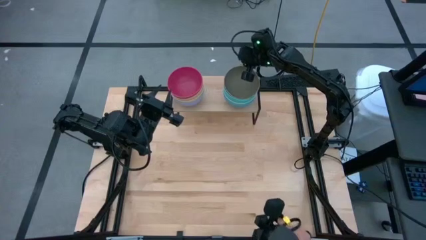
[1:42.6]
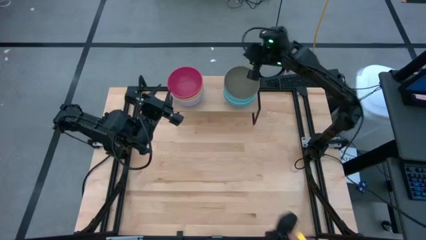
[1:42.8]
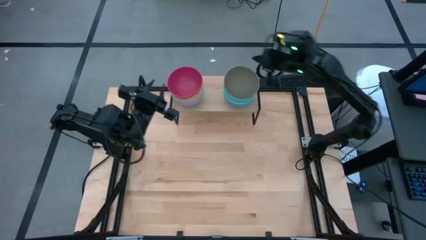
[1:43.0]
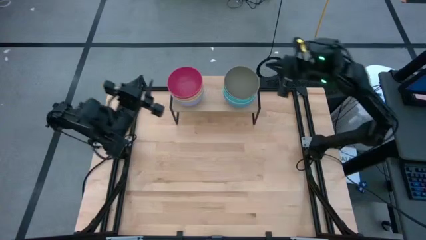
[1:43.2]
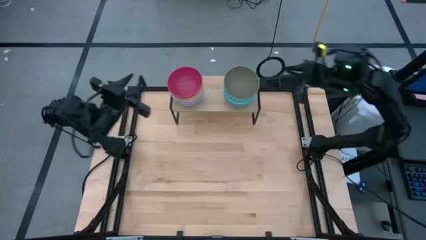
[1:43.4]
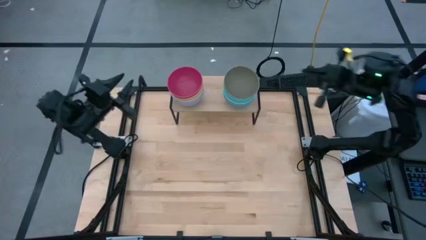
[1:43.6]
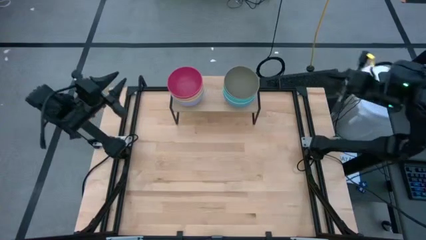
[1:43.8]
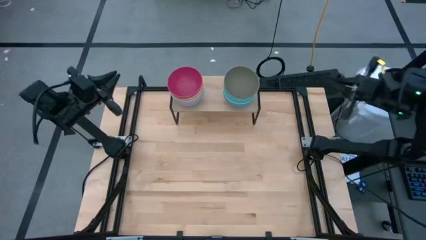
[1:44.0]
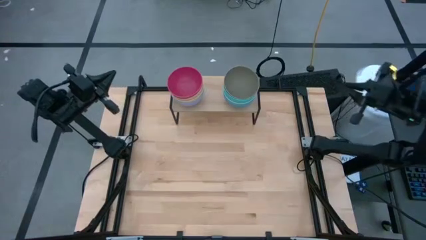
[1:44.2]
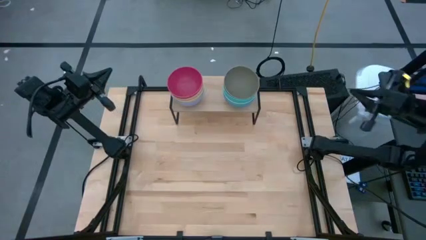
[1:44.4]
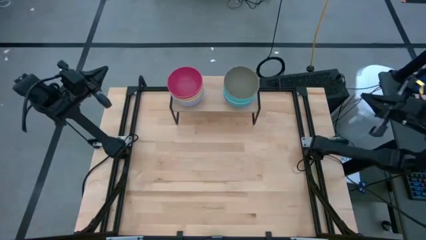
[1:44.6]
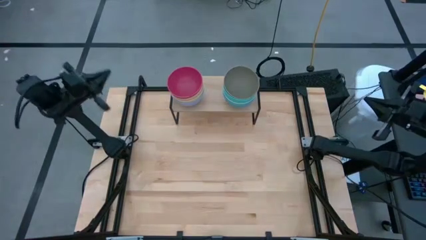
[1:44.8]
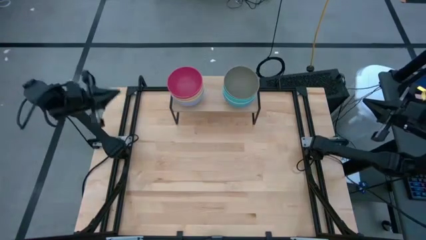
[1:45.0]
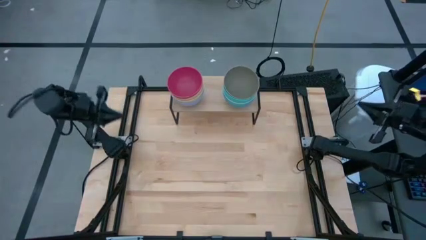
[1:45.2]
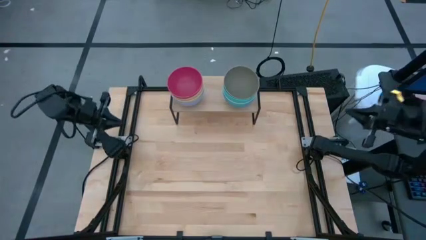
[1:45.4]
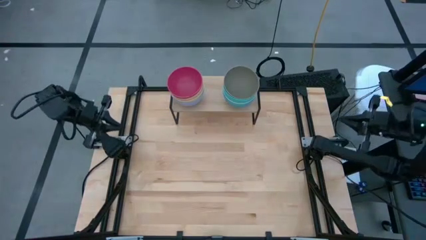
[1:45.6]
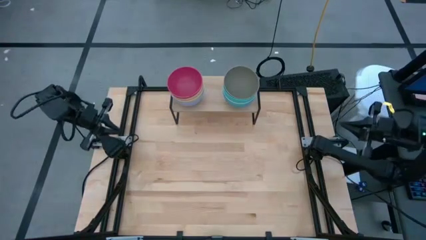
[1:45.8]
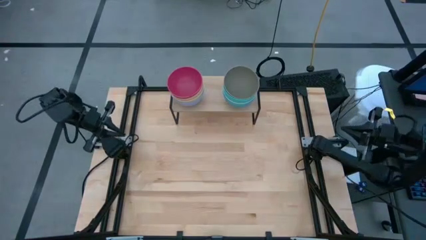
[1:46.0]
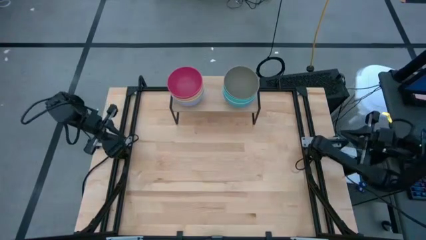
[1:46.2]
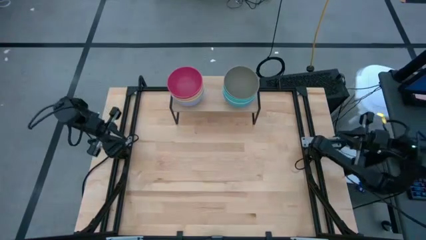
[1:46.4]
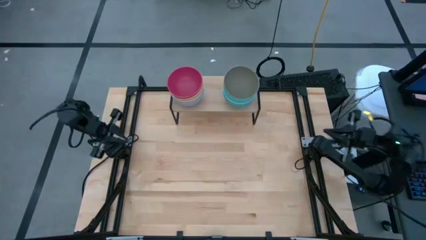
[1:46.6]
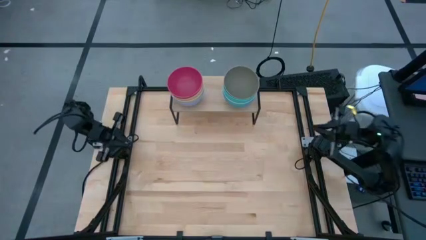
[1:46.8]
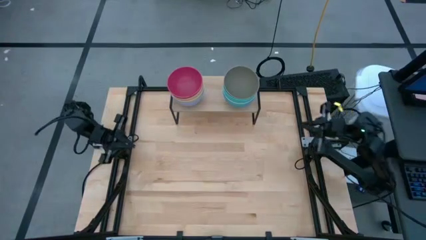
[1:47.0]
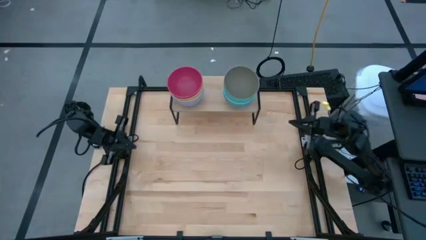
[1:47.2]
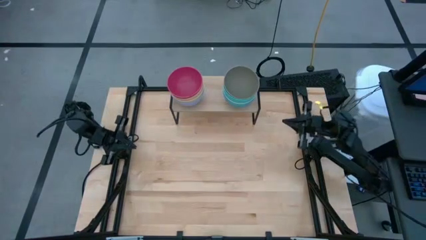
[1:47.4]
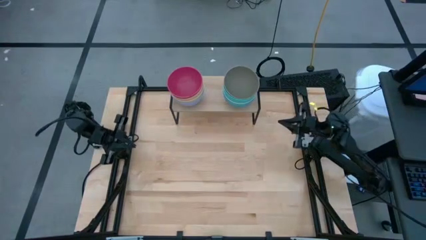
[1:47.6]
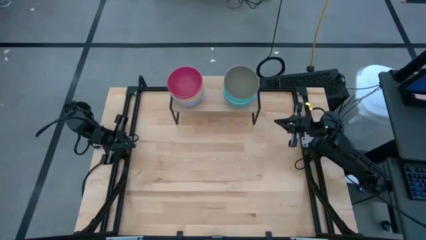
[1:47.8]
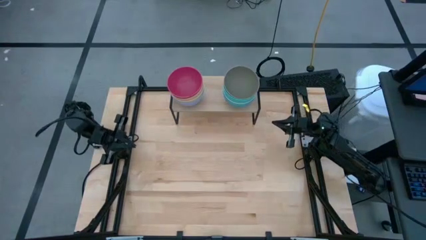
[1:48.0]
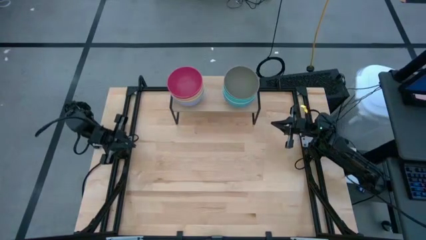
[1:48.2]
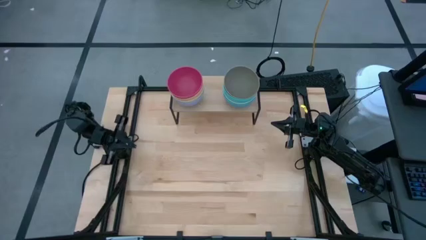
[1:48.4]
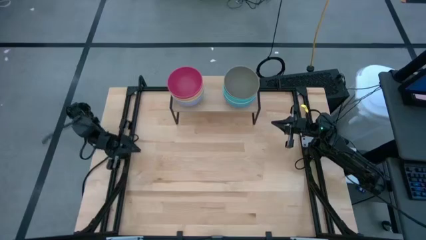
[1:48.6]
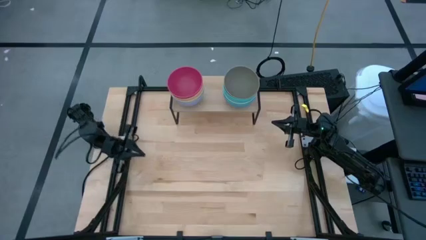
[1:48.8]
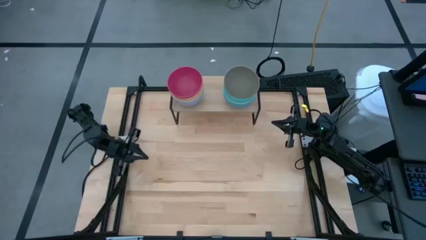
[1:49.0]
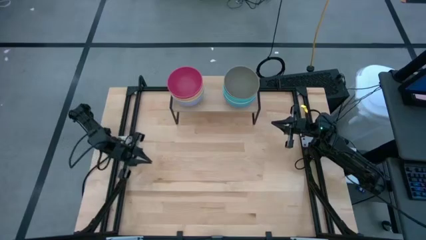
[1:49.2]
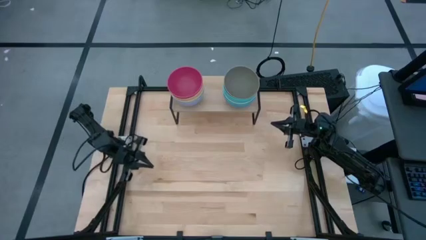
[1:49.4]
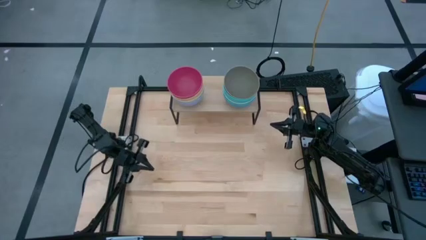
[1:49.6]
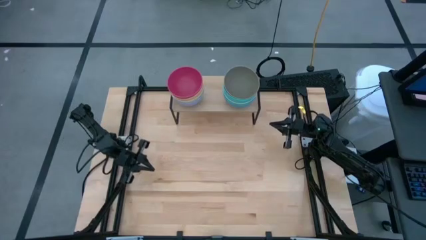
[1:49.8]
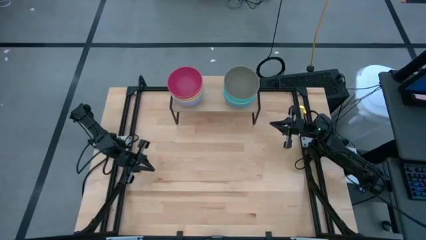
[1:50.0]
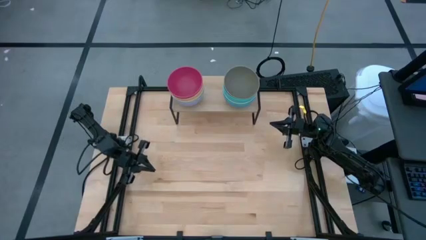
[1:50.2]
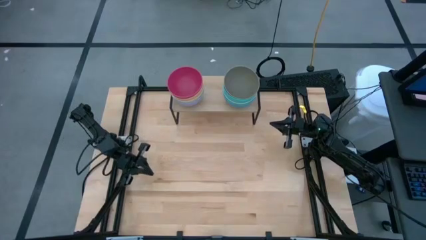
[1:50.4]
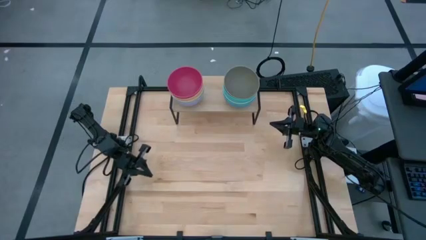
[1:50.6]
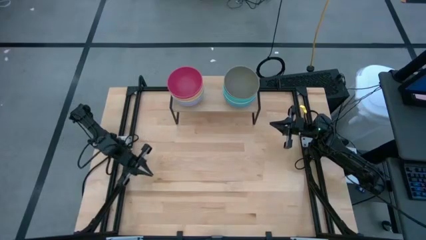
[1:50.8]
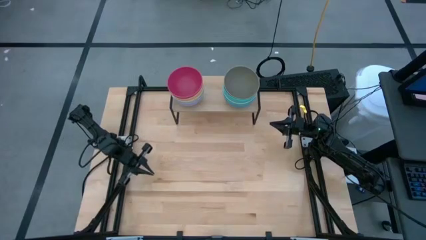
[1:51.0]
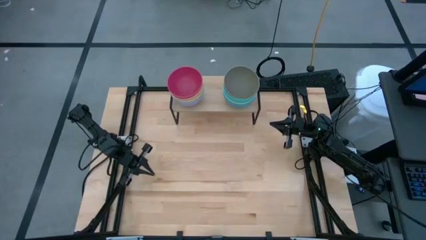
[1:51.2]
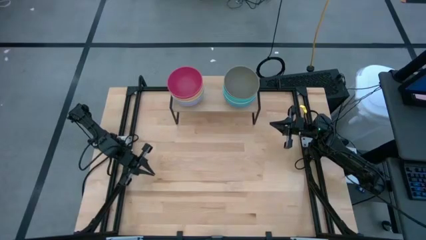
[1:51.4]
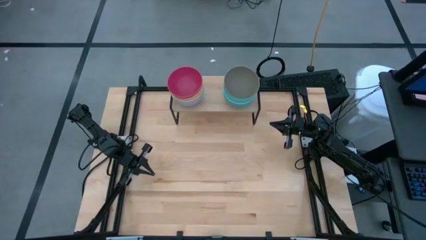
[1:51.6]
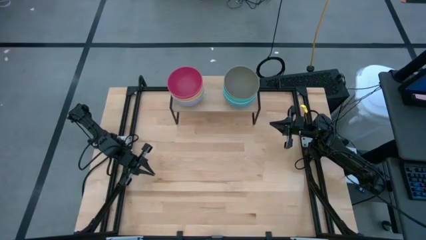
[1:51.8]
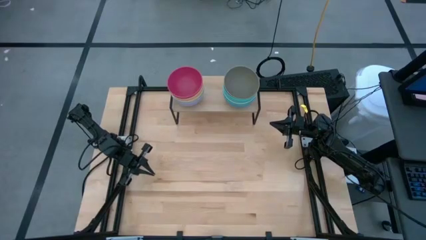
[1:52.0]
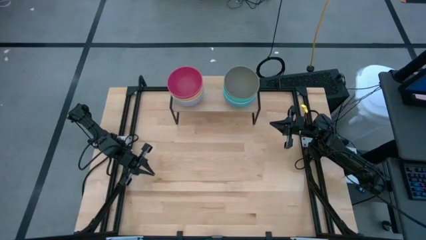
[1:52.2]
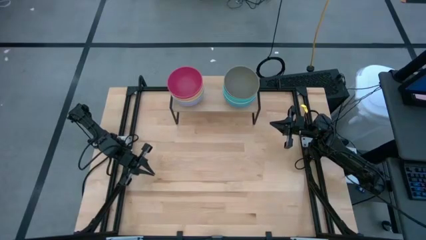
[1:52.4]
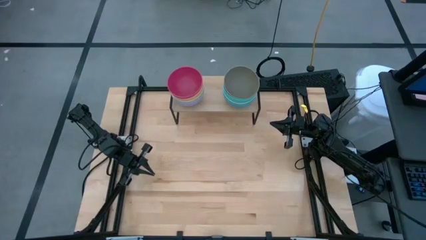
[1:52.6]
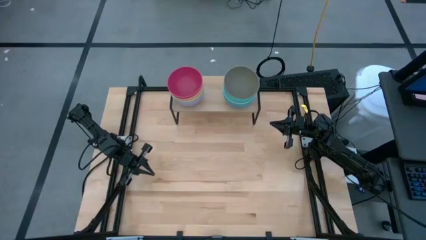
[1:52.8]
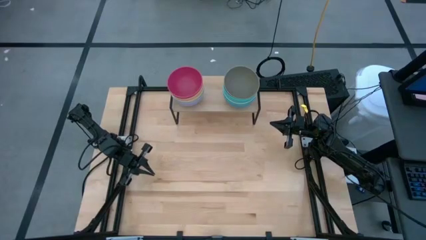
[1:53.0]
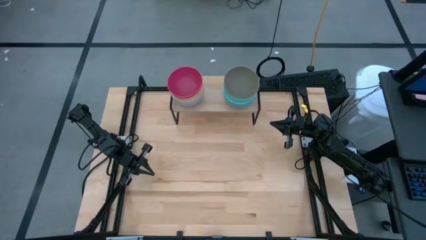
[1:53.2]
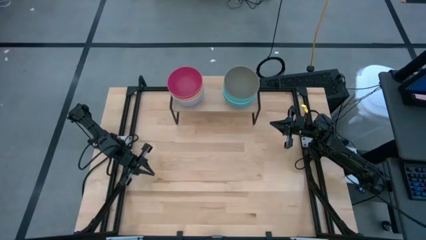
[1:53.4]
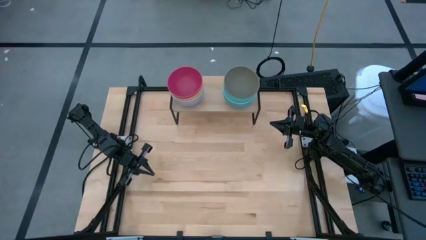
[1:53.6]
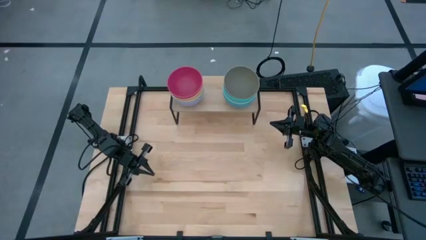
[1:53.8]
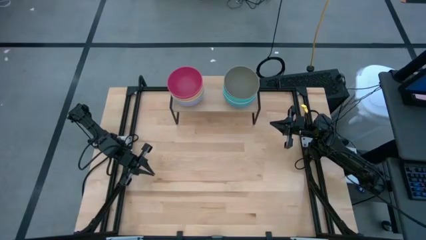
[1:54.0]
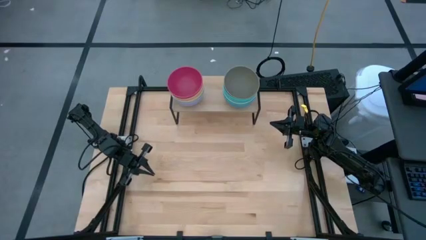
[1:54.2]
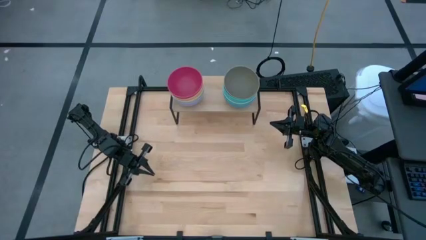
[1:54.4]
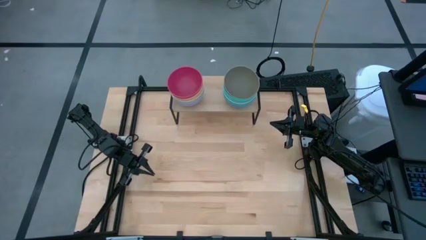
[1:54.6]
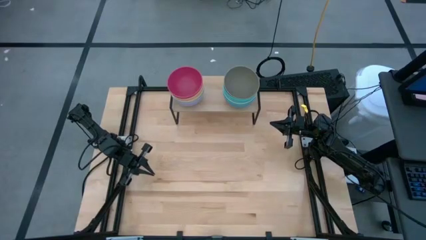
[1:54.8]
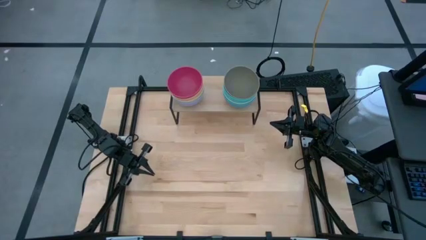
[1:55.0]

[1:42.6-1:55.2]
Task: Place and stack bowls onto a shelf
Return to Home Position

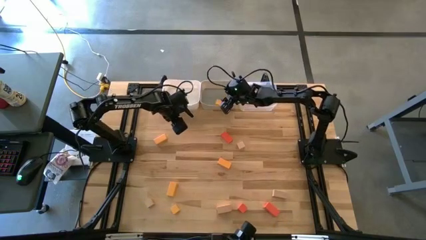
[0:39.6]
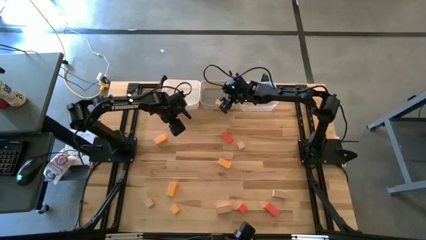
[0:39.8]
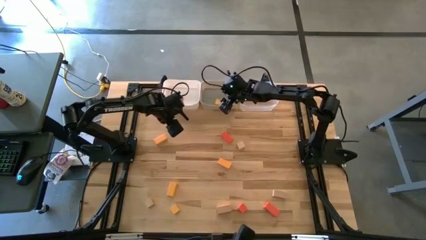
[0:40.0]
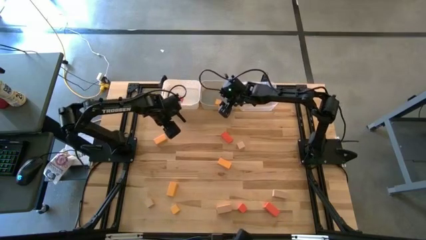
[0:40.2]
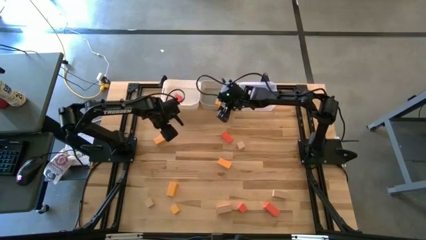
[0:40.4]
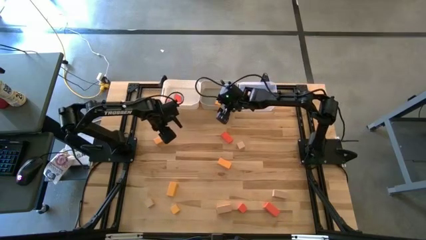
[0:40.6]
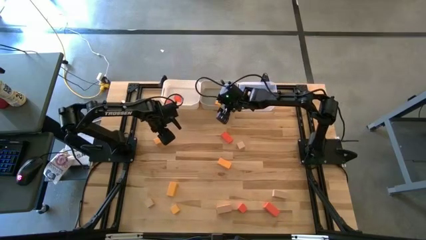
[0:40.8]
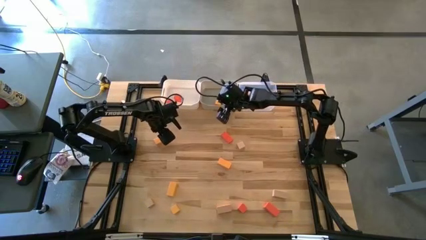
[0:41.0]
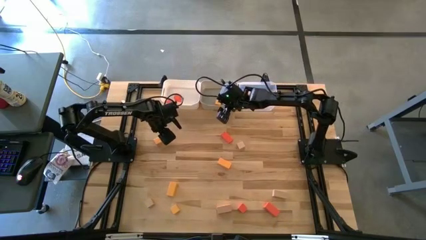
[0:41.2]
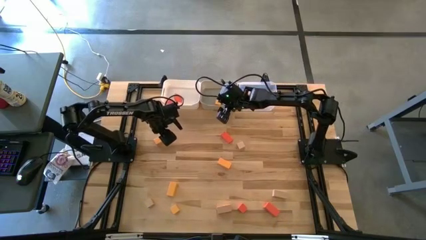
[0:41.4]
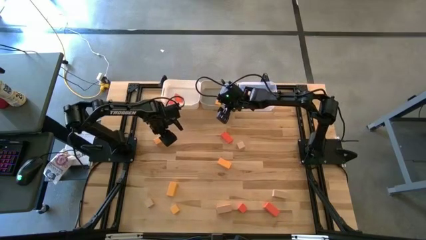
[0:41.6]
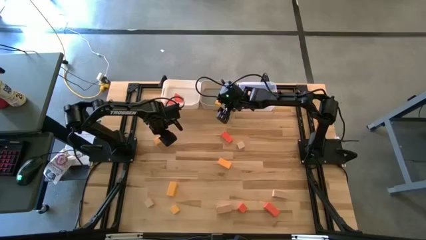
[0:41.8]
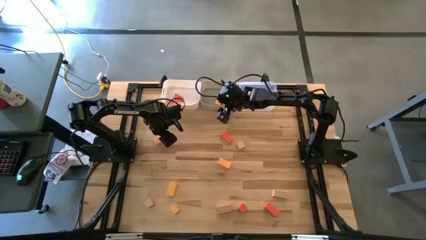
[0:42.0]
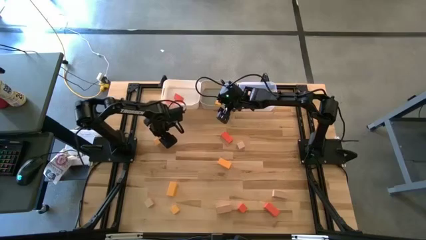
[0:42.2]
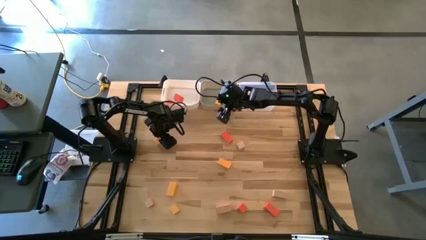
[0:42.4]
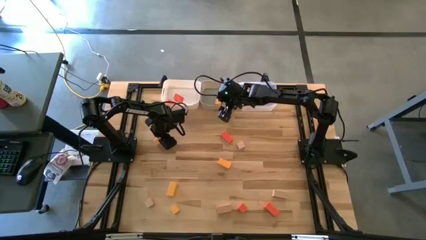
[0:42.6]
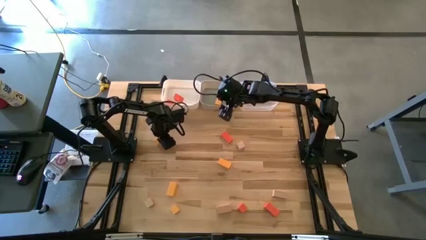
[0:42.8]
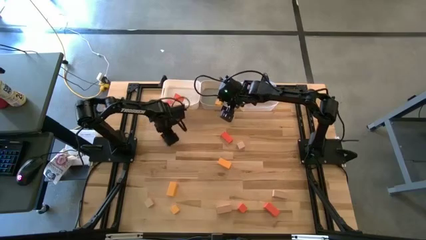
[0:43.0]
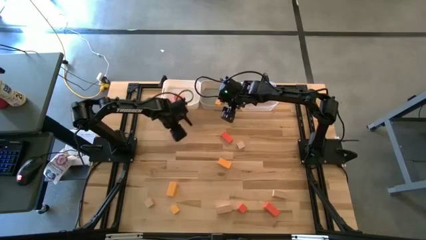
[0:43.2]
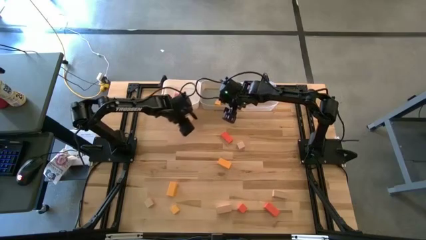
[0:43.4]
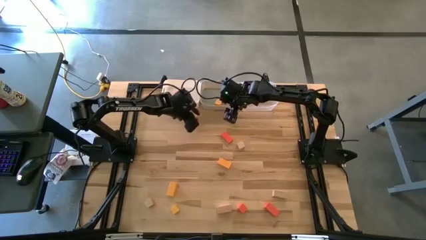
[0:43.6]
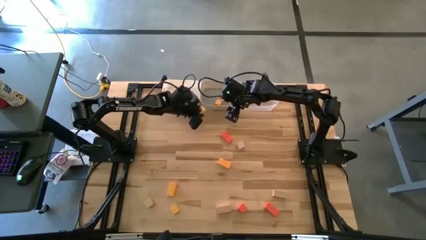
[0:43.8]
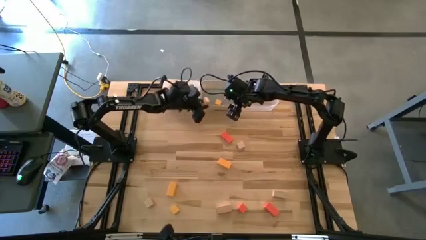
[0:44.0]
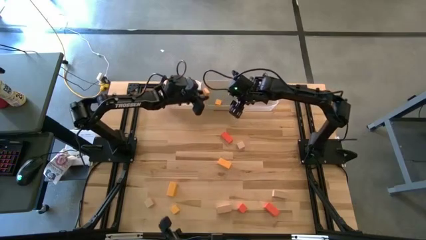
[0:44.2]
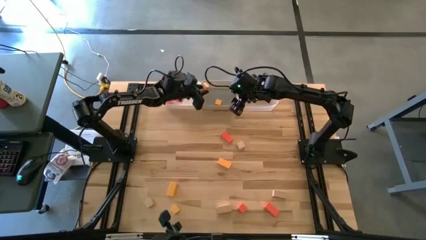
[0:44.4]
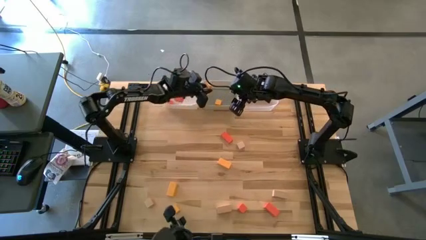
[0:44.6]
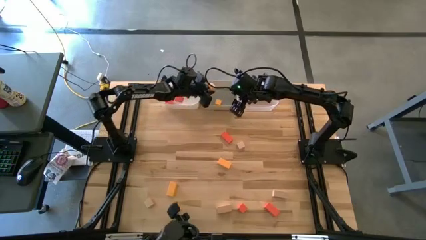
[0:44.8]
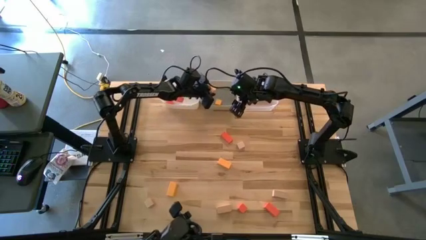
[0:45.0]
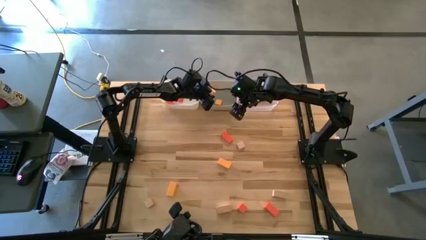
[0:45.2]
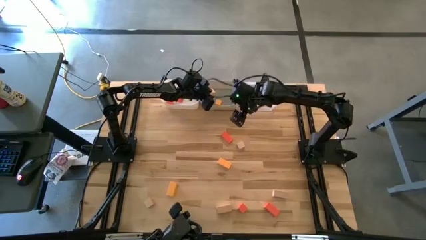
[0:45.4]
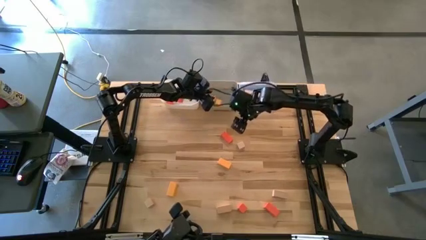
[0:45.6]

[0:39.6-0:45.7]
Task: Sort & place blocks by color
Put the yellow block into the gray bin
